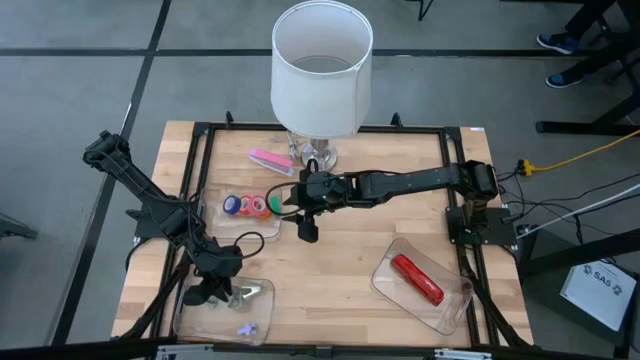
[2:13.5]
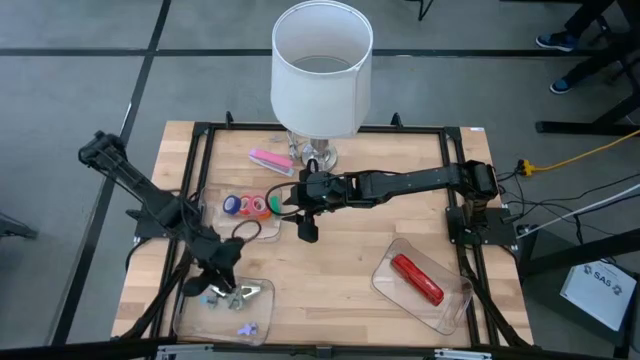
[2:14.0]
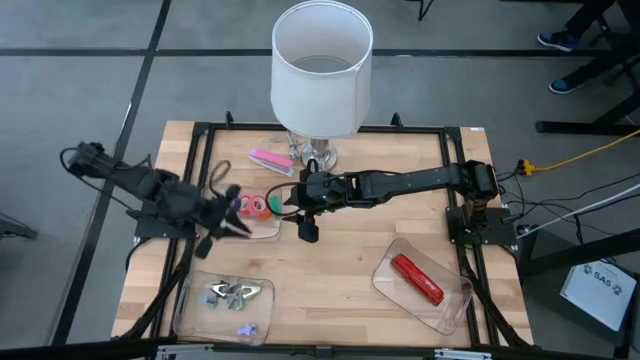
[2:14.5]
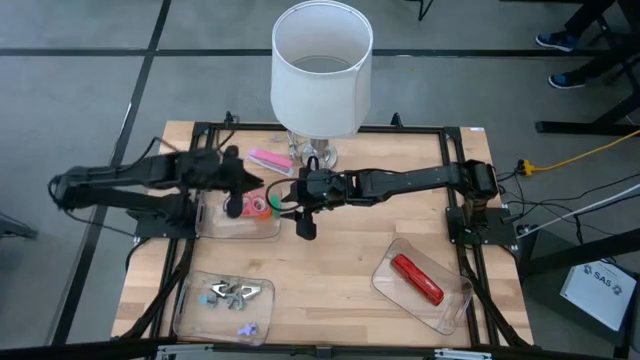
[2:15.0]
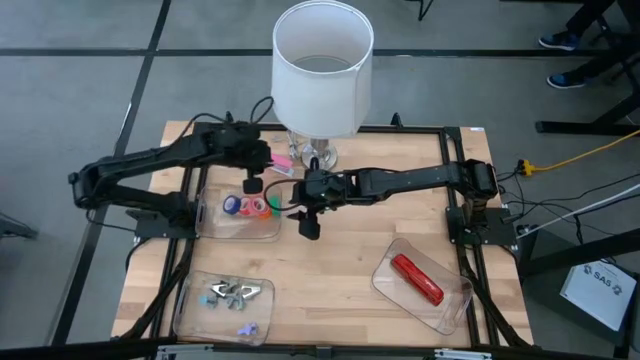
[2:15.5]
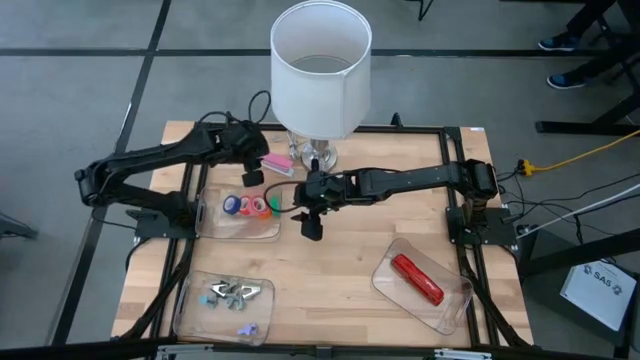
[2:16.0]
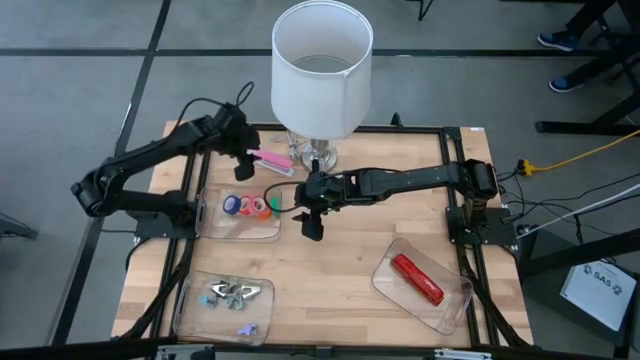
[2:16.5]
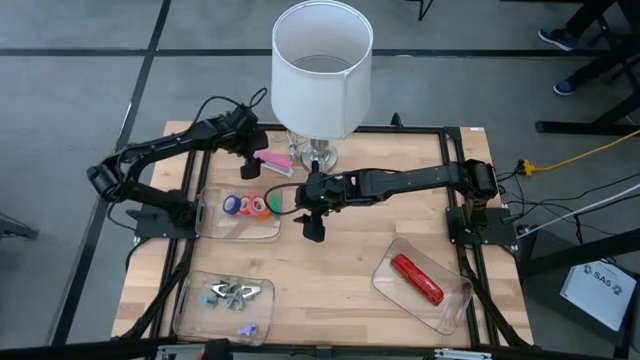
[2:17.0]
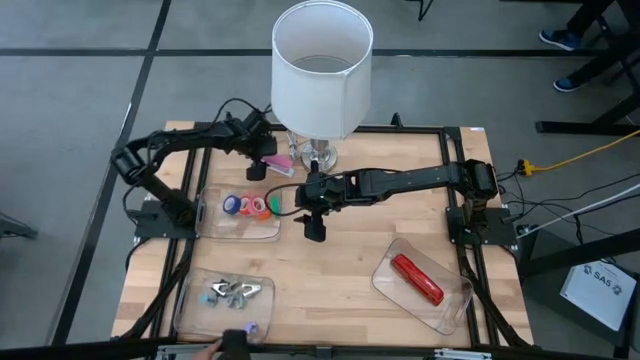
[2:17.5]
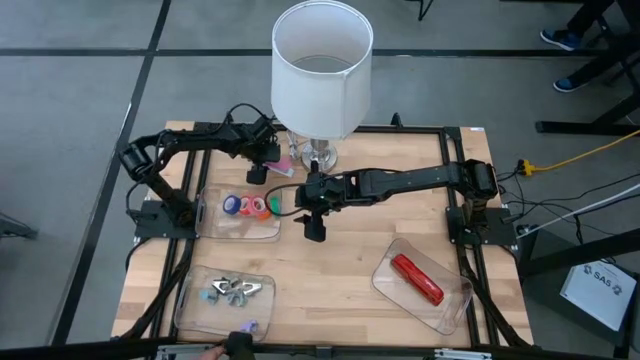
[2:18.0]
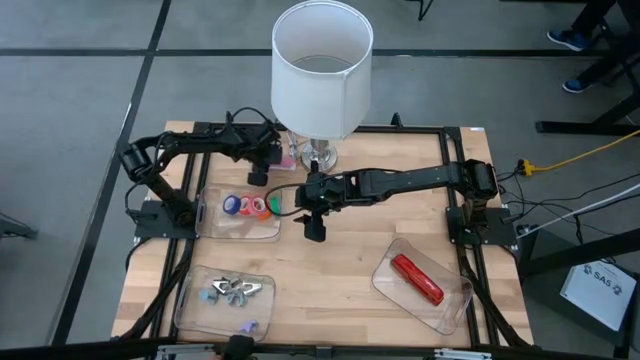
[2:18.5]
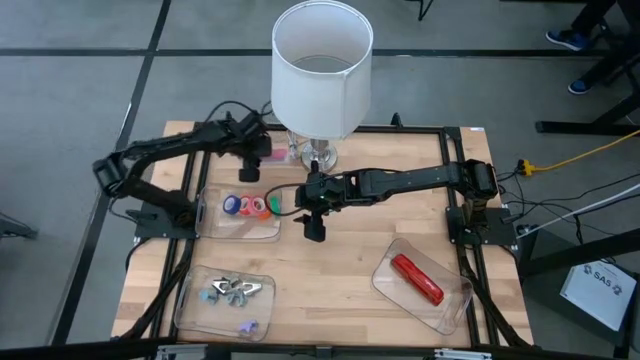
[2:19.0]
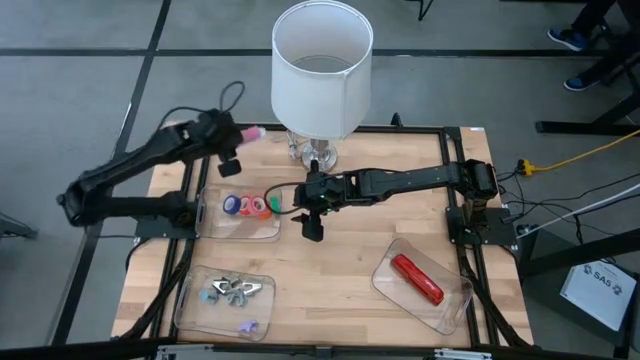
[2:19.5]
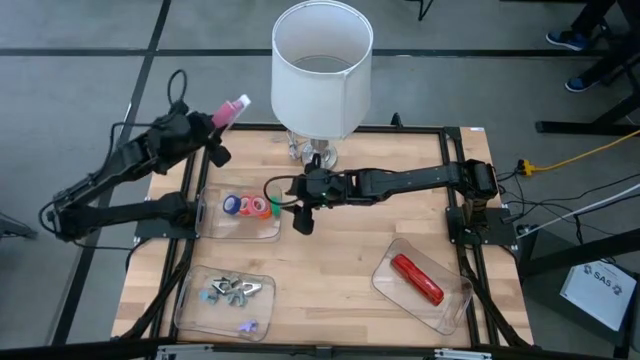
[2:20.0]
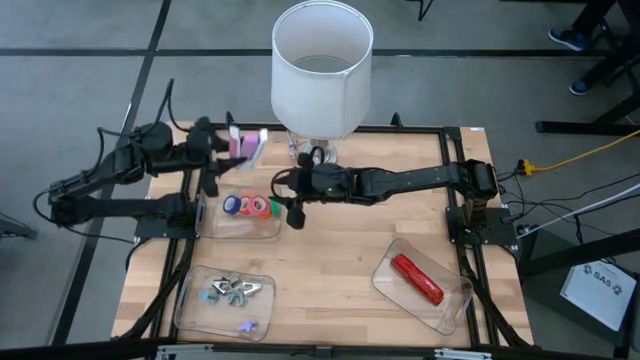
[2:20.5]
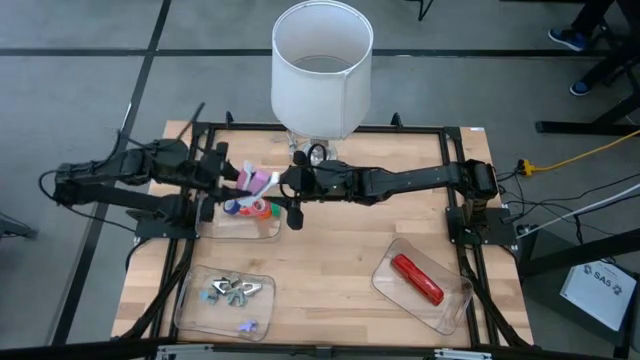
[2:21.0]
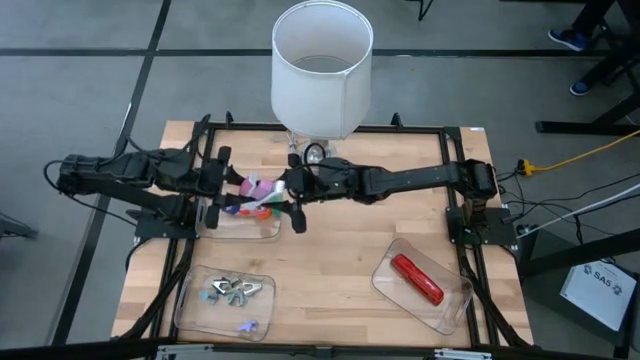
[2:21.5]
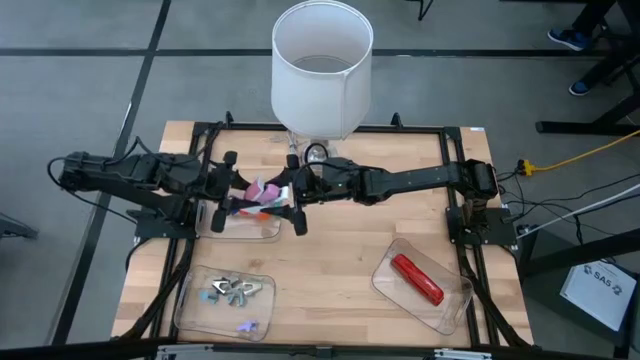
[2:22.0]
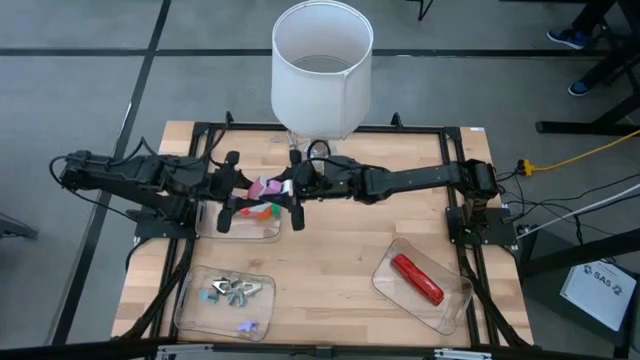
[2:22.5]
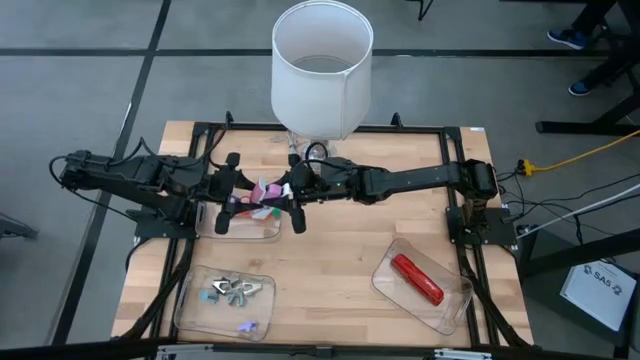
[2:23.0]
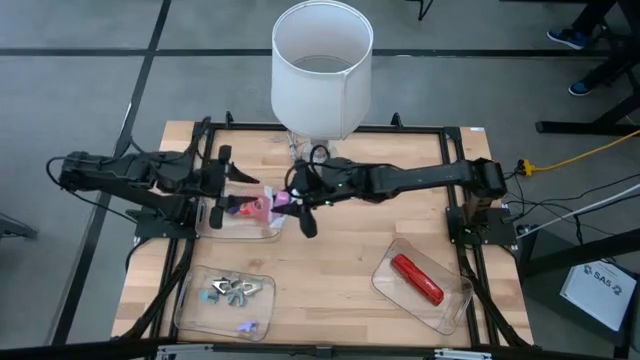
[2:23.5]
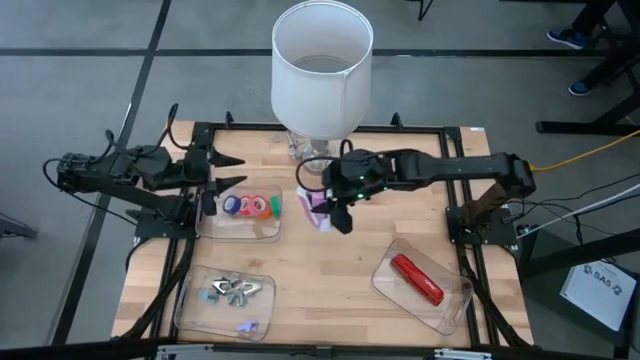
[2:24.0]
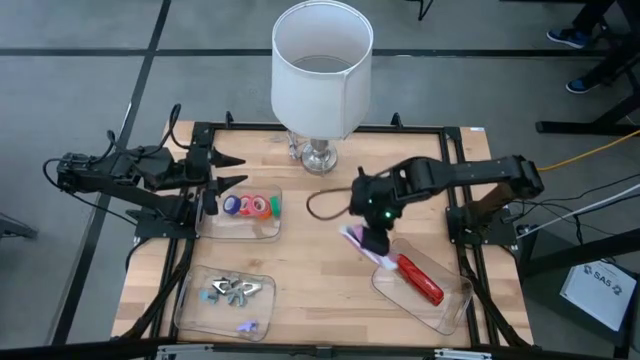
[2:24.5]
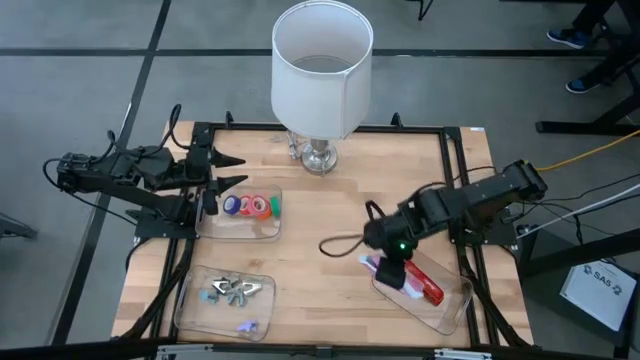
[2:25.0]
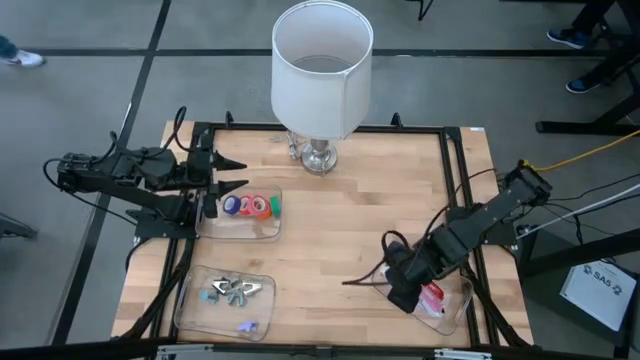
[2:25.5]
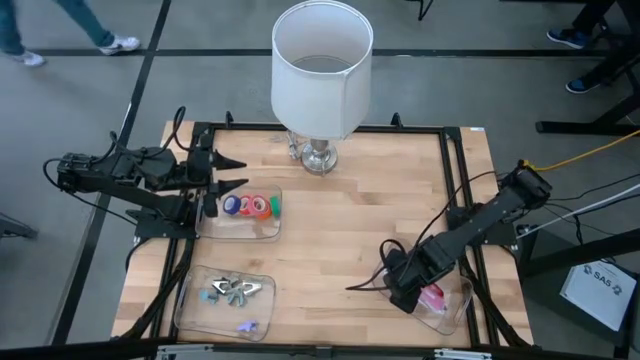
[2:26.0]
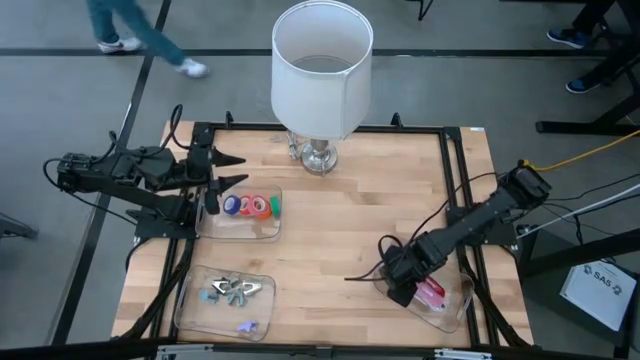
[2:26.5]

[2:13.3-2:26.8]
Task: Pick and place Stapler, Stapler remover, tape
Put the pink stapler into the bottom right transparent bin

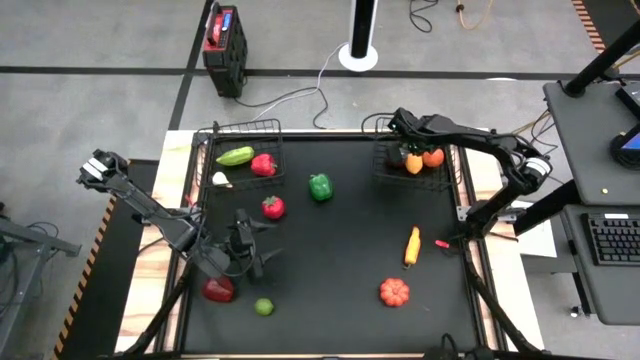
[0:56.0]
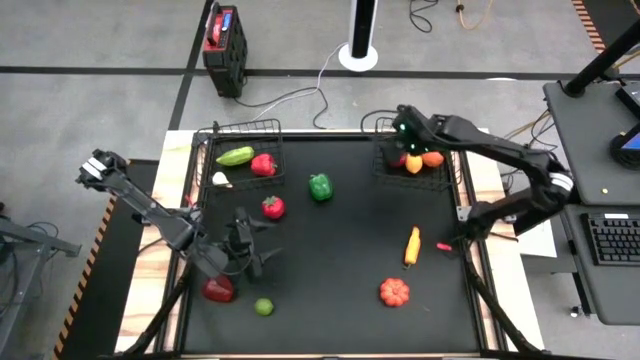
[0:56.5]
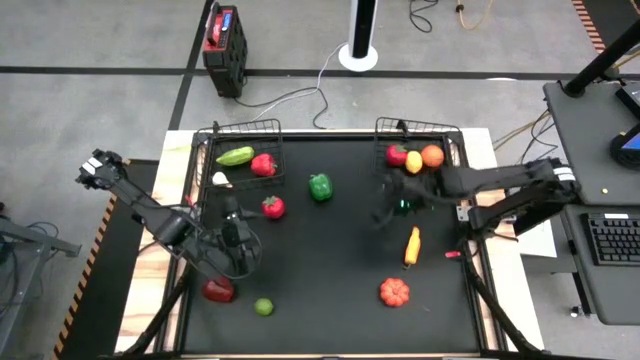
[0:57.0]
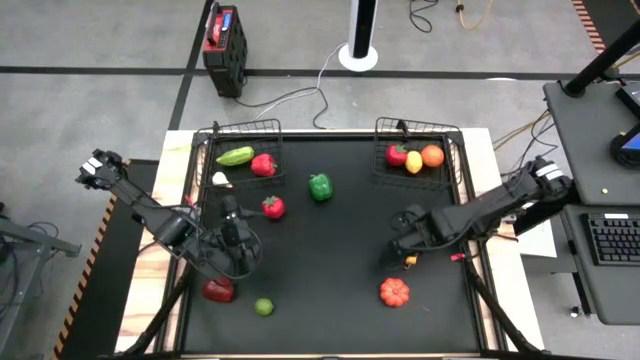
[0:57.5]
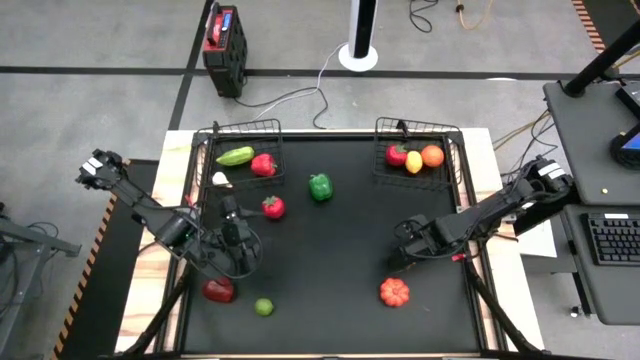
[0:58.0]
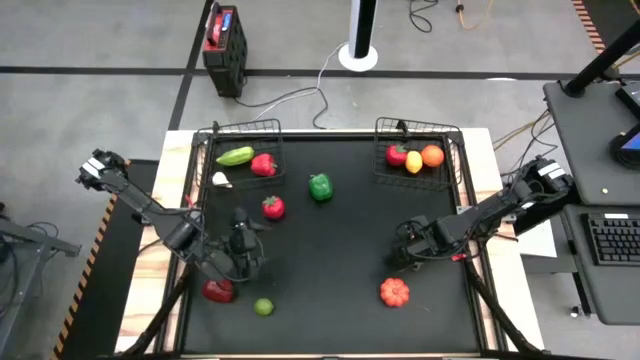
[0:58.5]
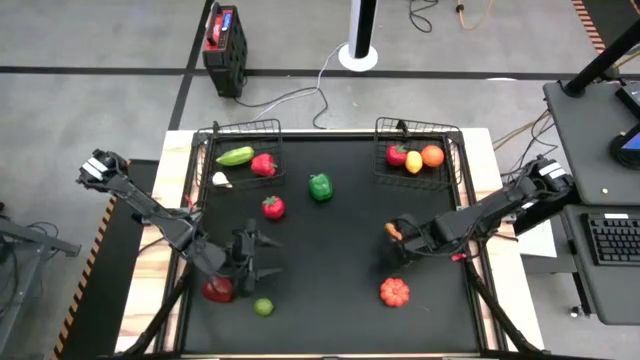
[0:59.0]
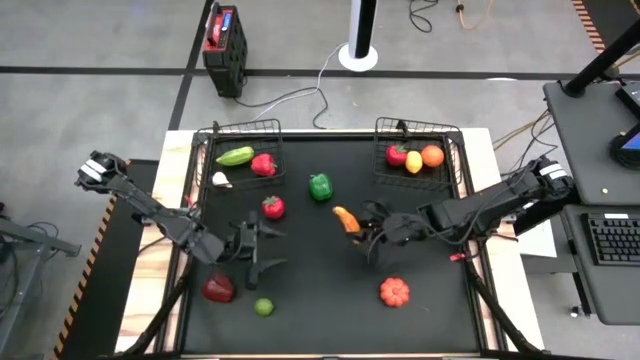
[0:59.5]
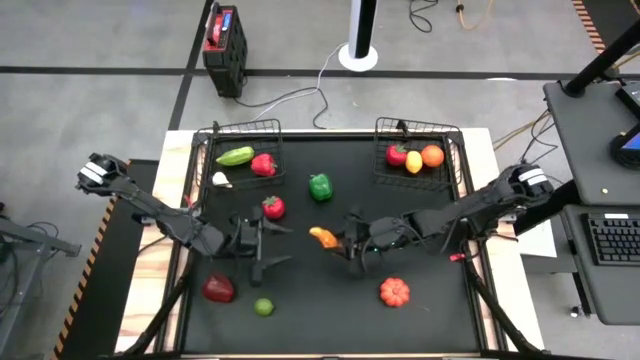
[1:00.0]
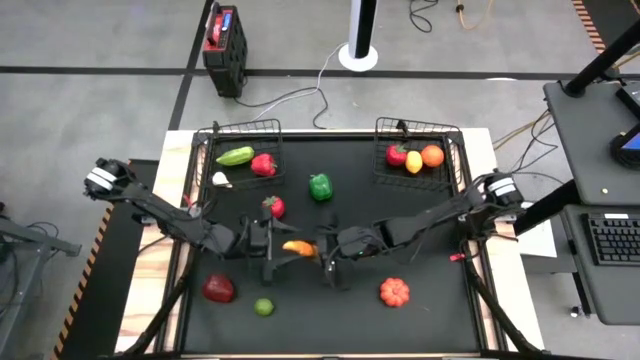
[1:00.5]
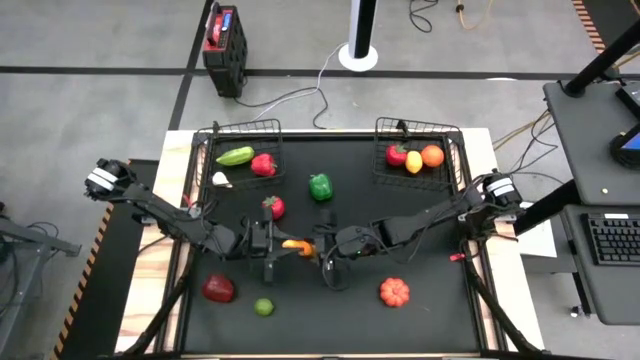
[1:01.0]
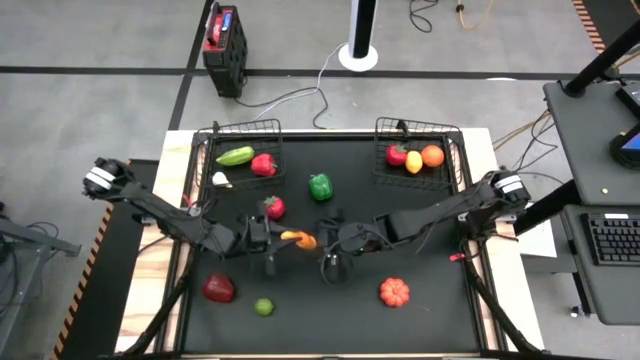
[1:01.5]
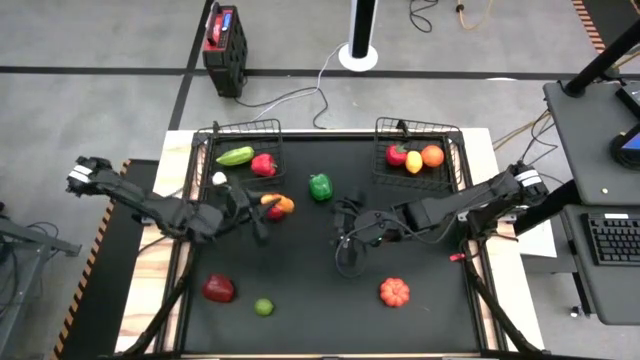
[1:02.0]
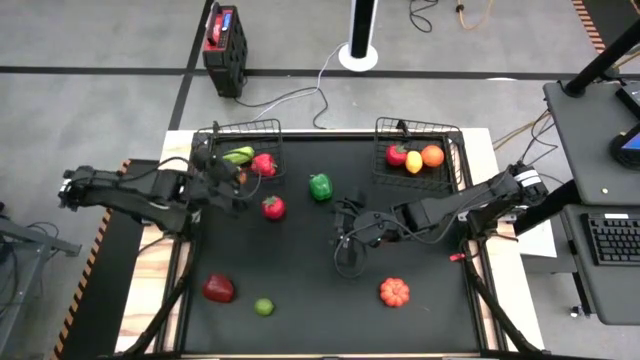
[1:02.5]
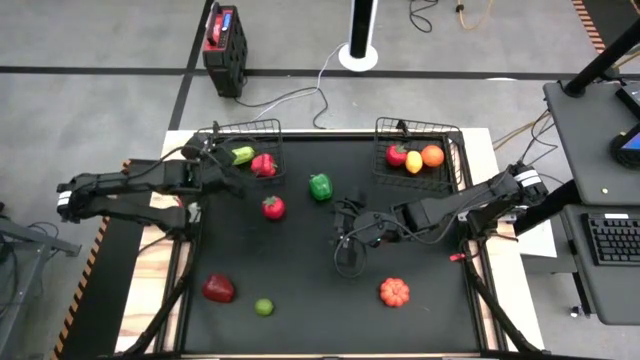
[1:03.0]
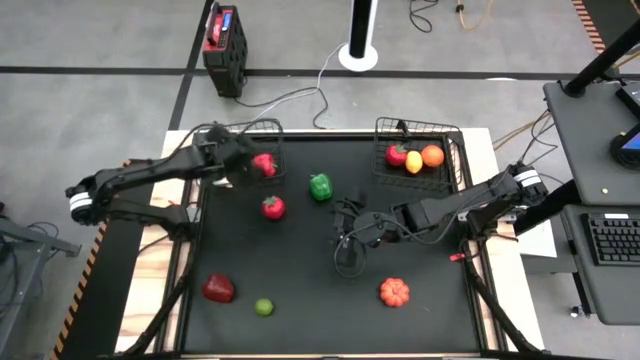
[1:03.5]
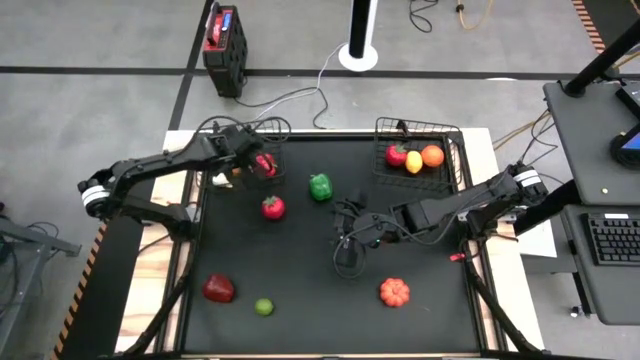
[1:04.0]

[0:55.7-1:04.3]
Task: Sort produce into baskets
Put the chili pepper into the left wire basket
